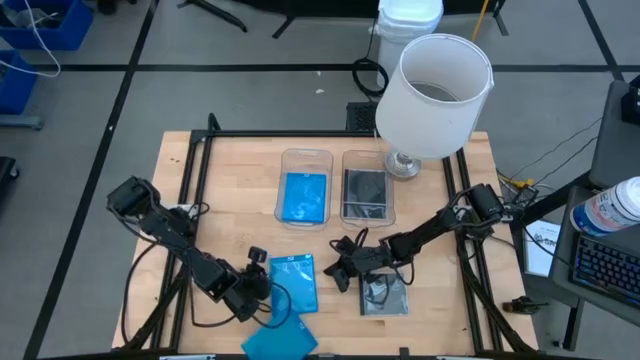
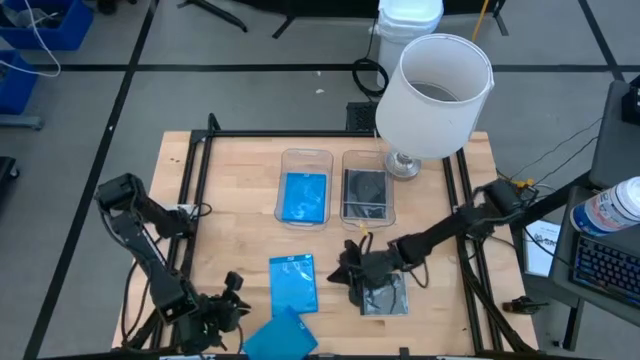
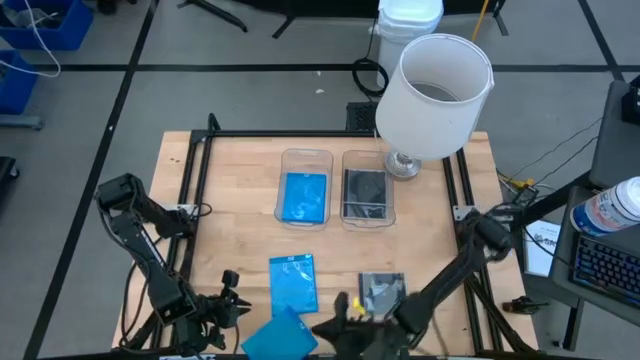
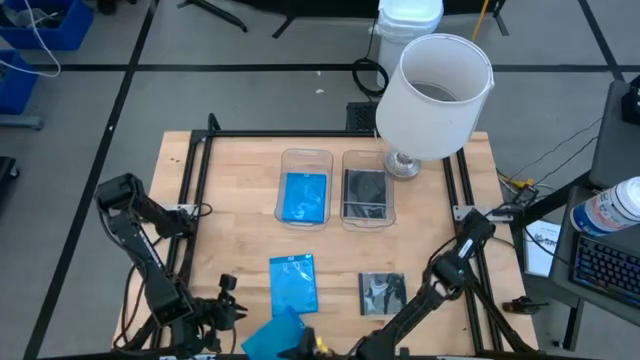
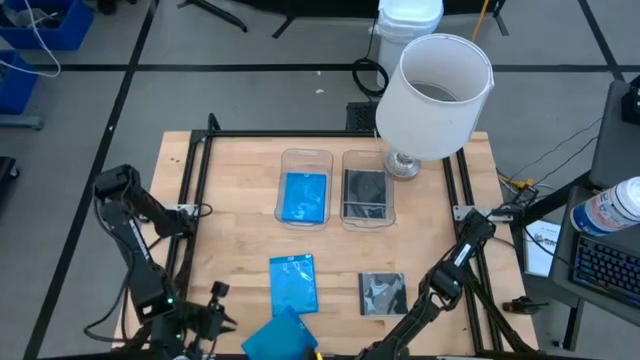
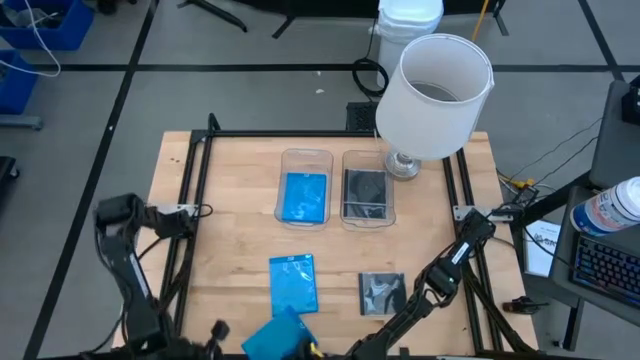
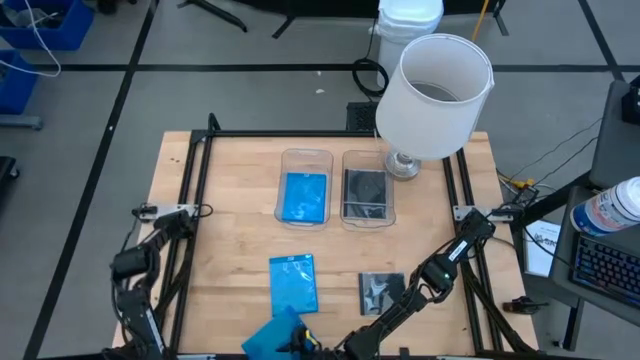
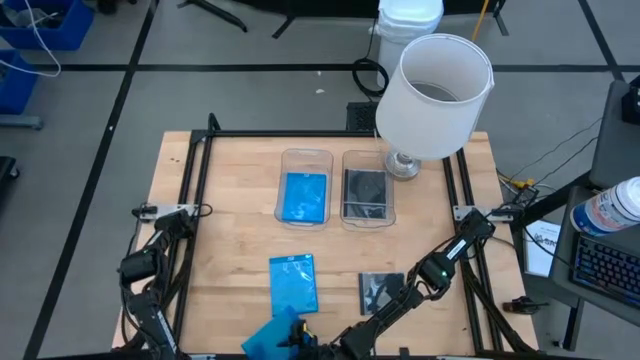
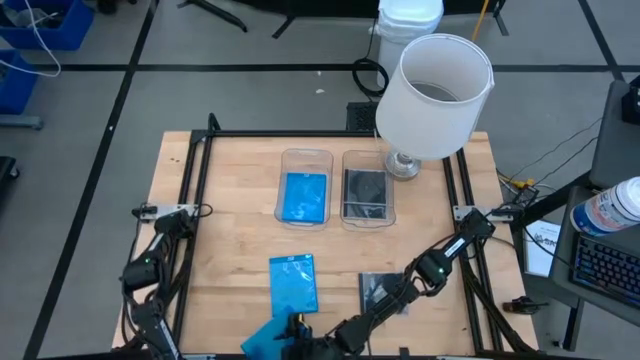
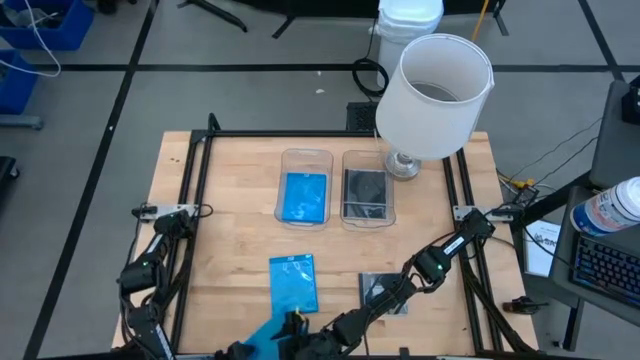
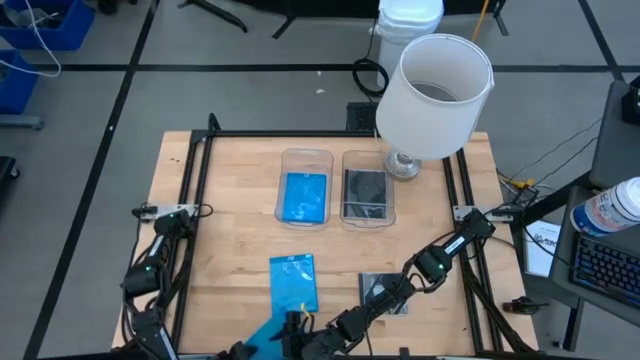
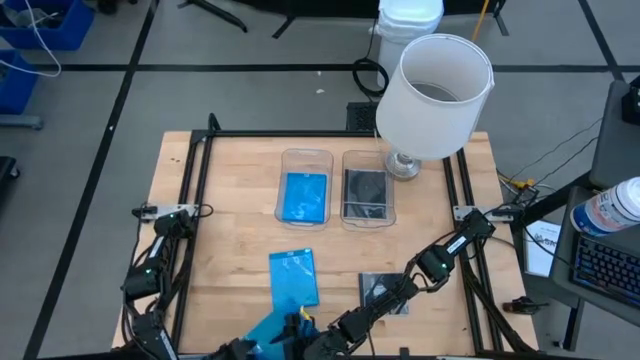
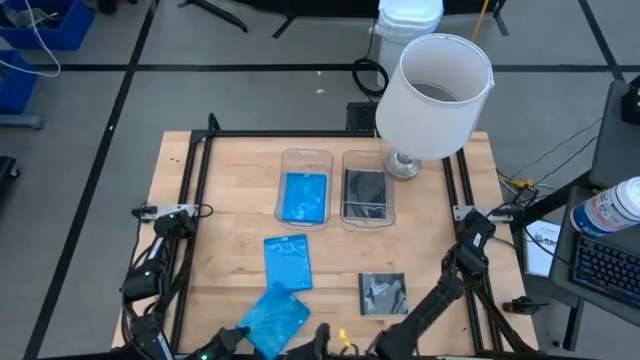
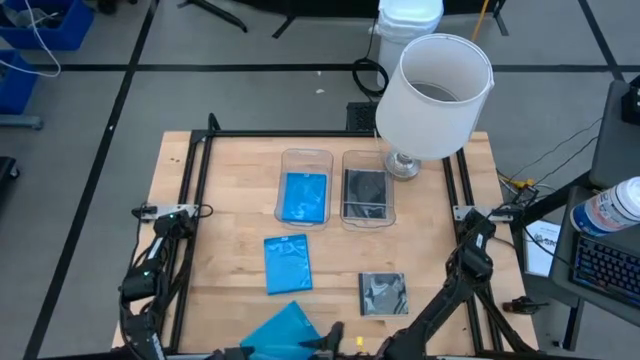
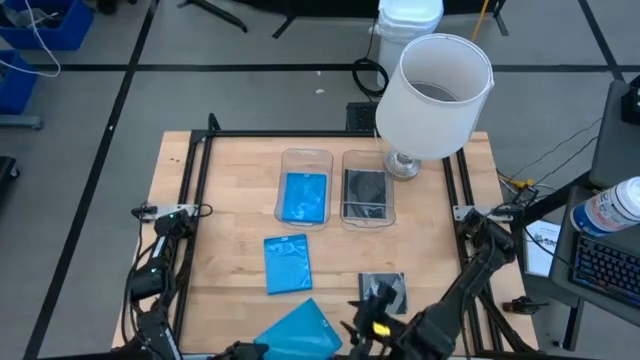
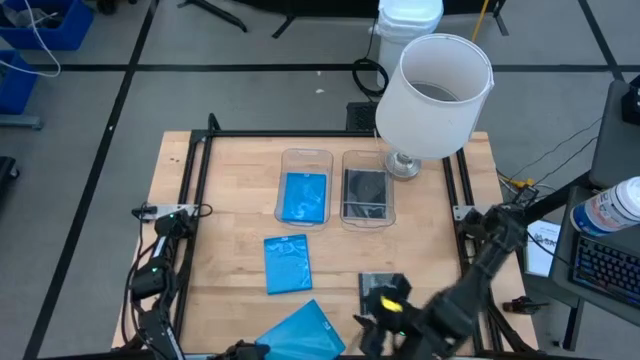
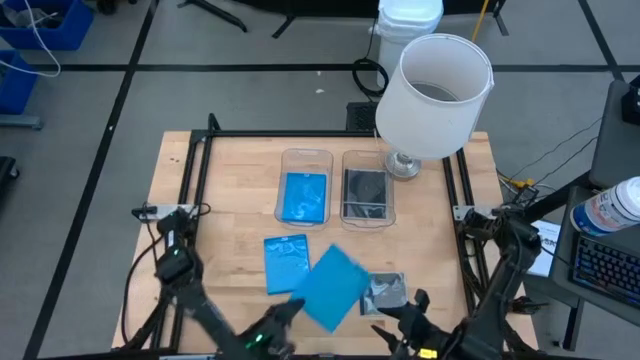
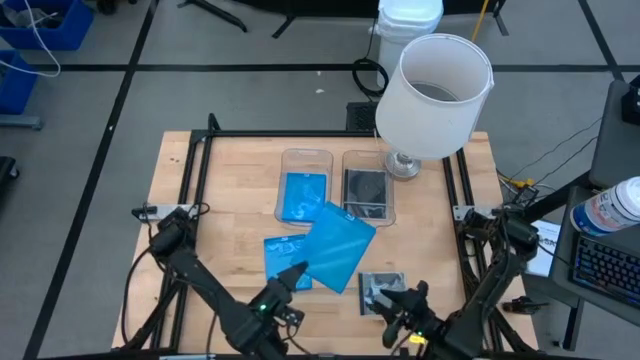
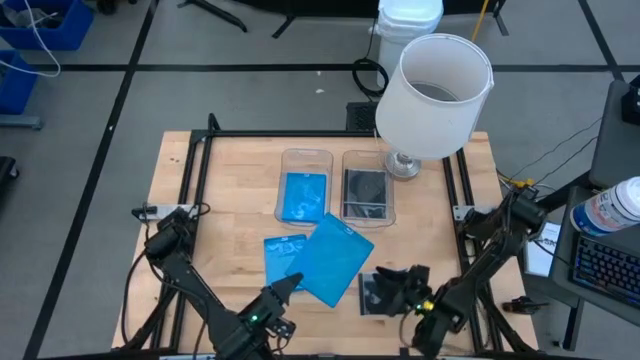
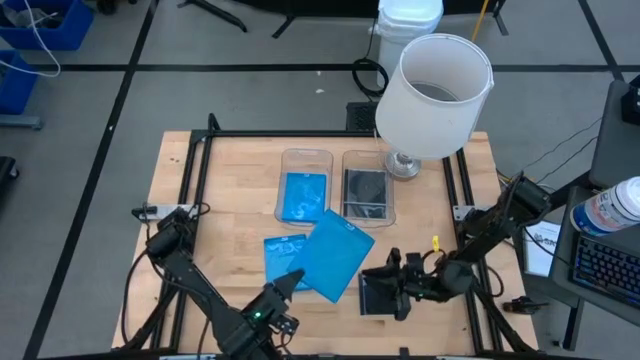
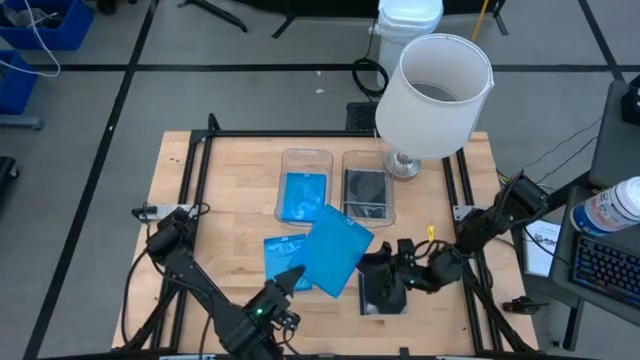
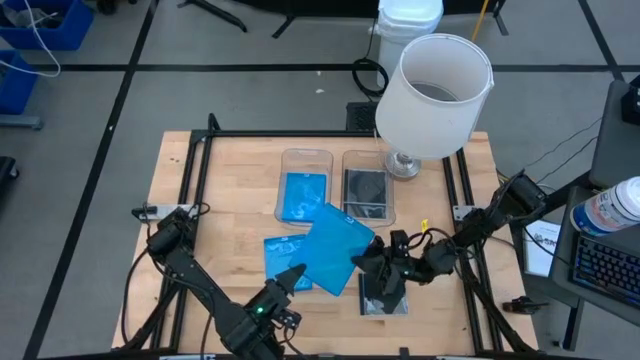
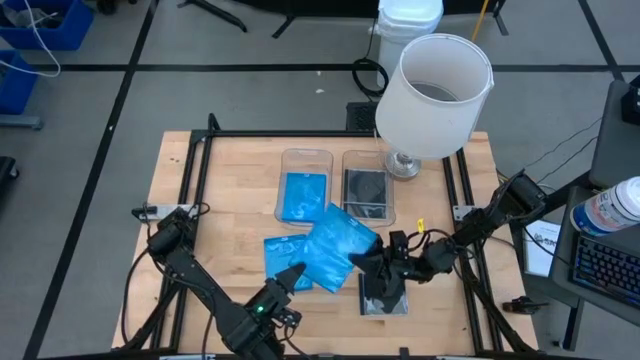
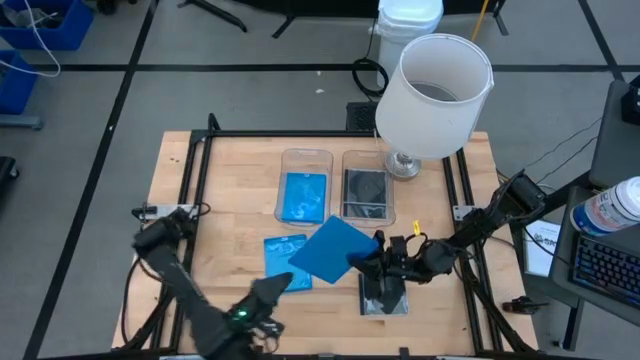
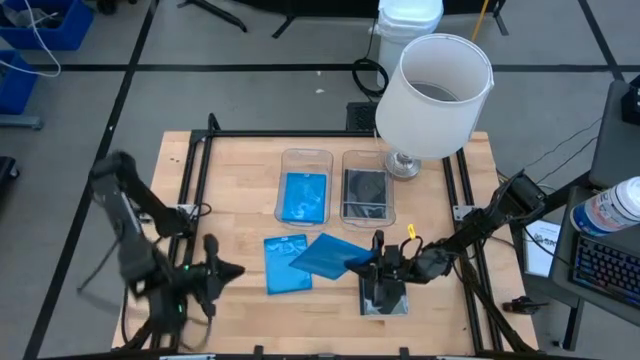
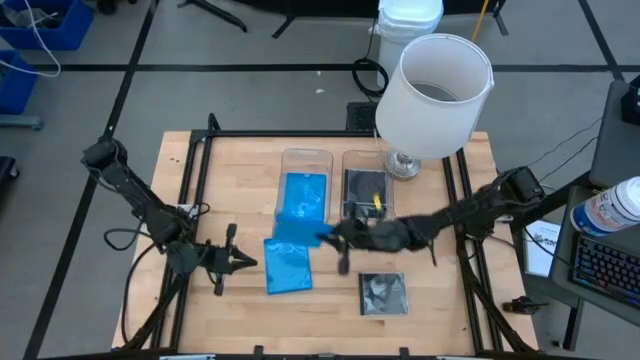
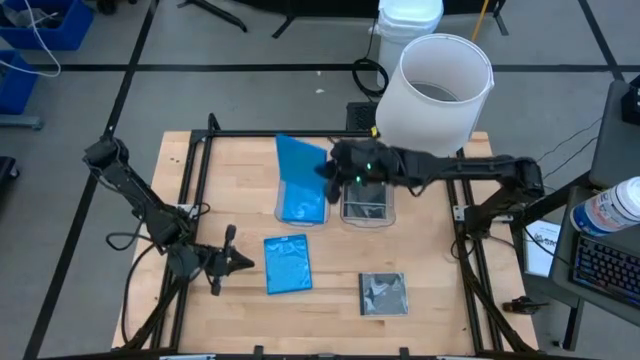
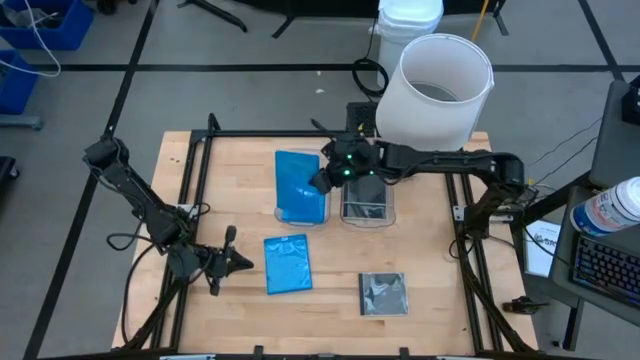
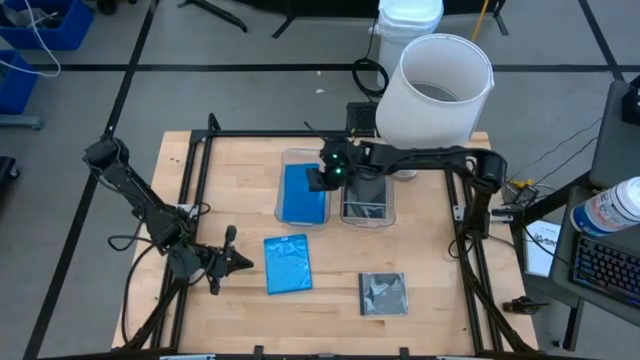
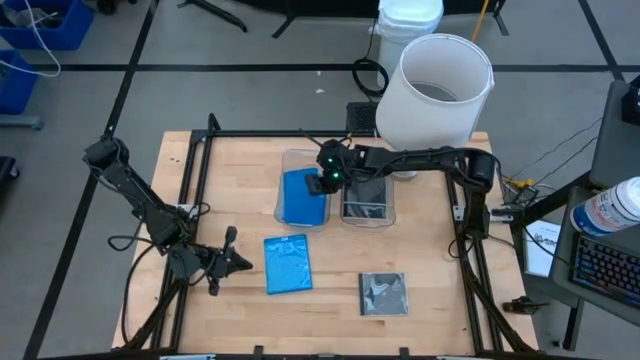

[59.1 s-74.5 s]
Task: Pick & place jewel cases by type
Put the blue cd case into the left transparent bin

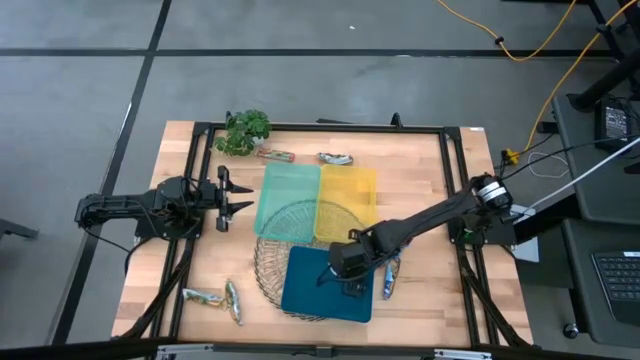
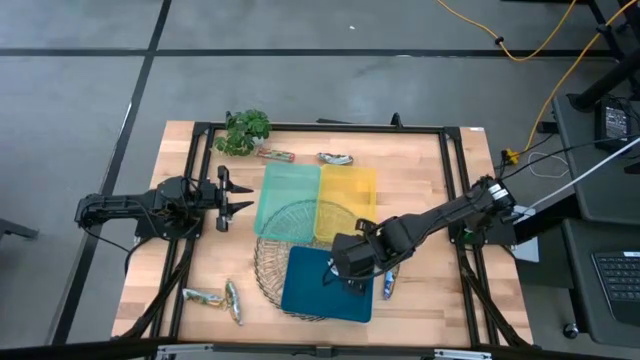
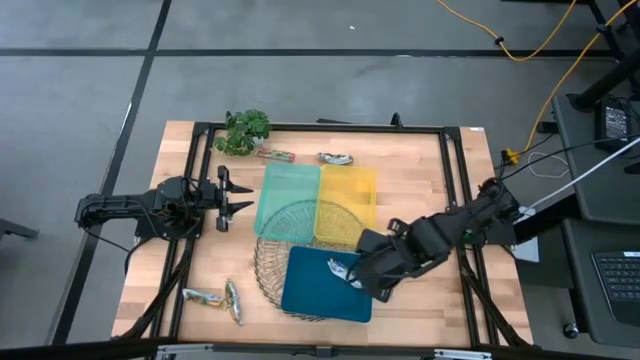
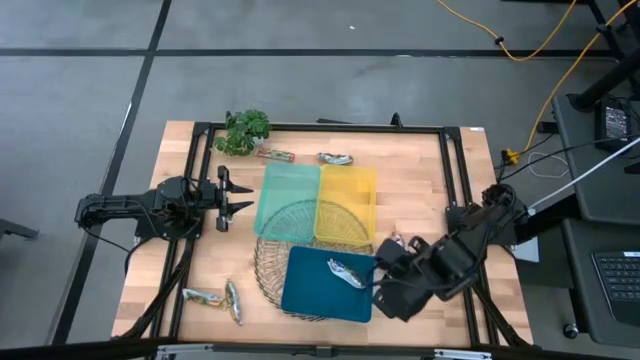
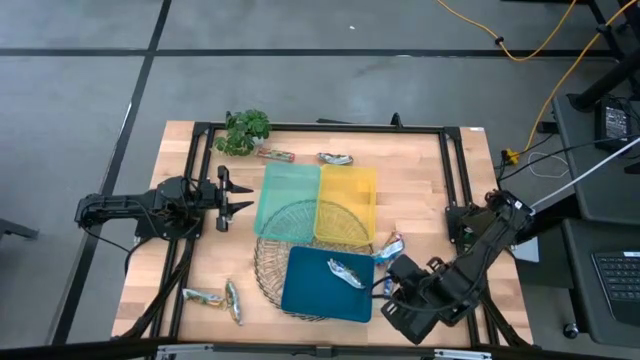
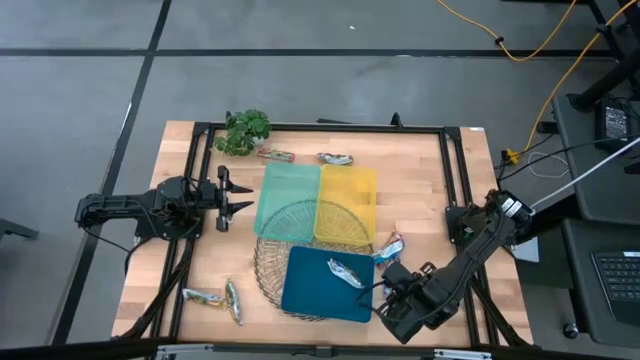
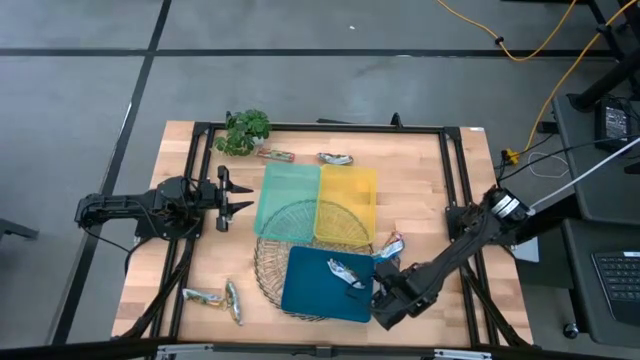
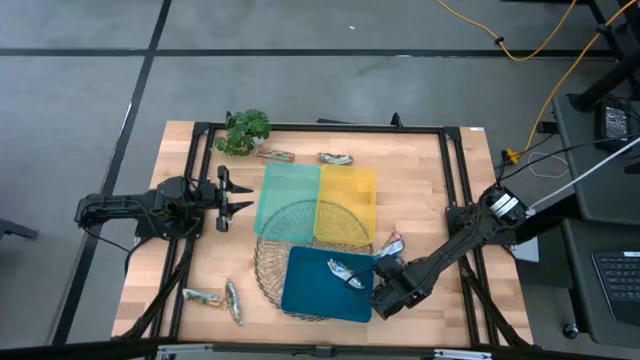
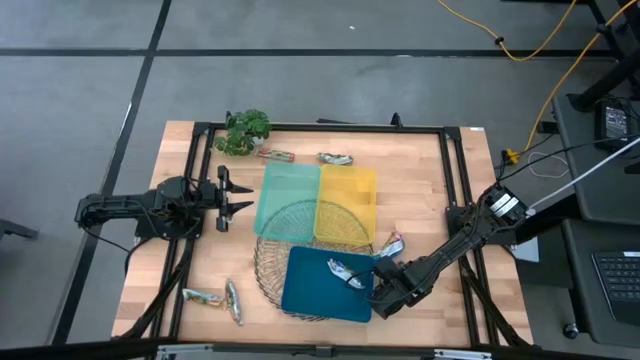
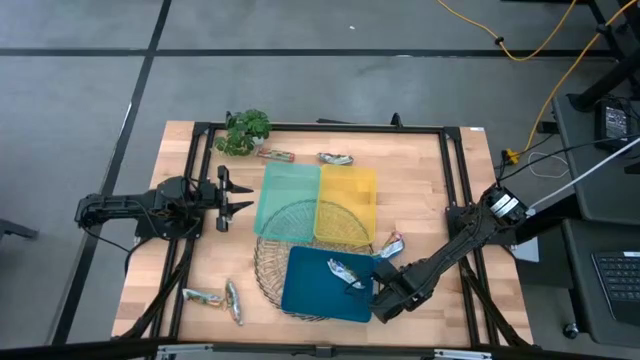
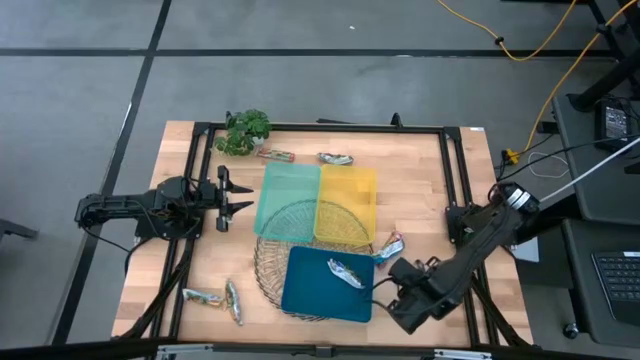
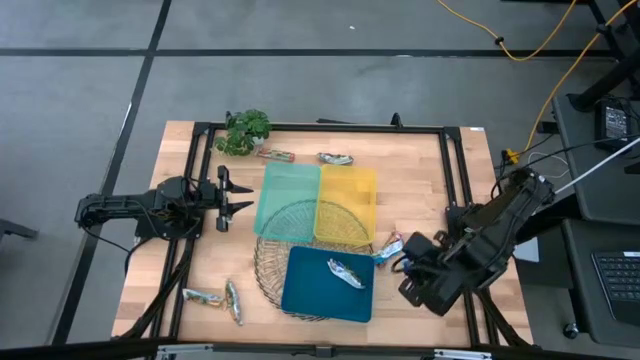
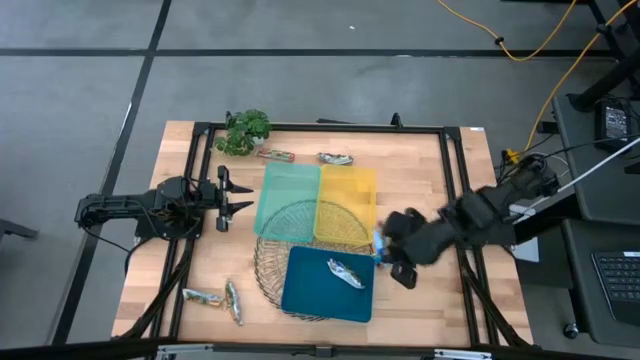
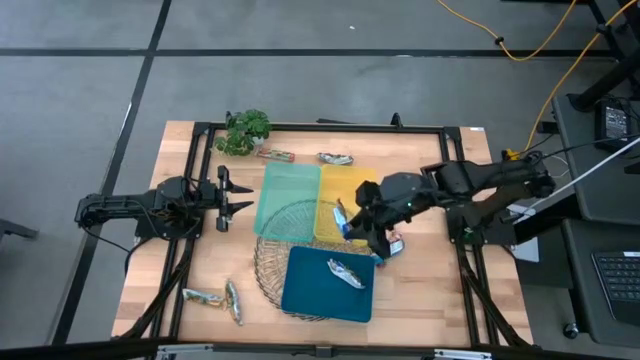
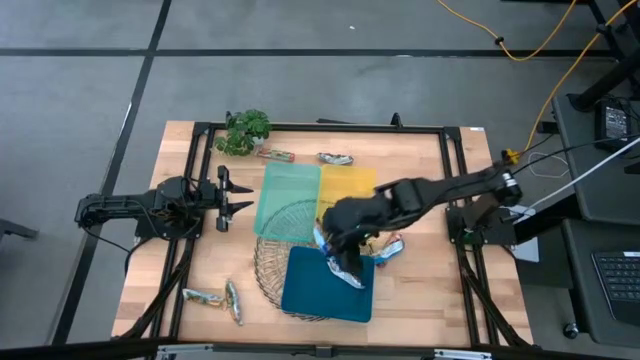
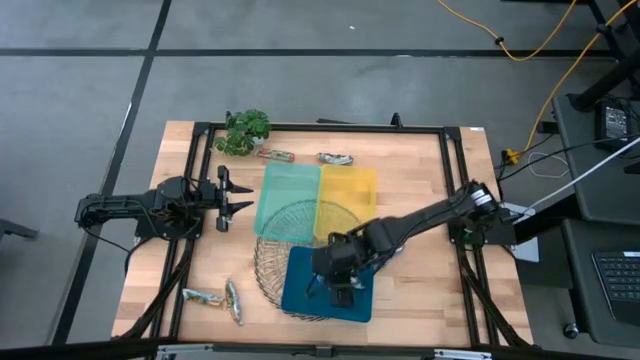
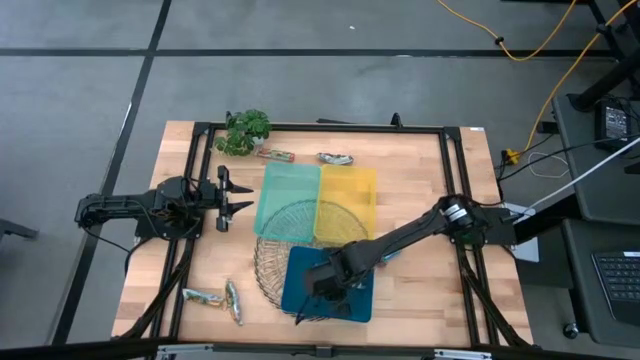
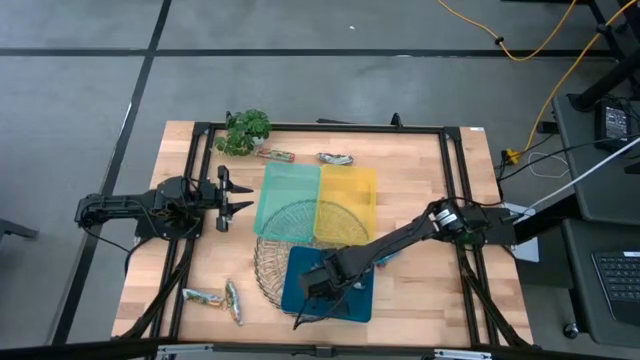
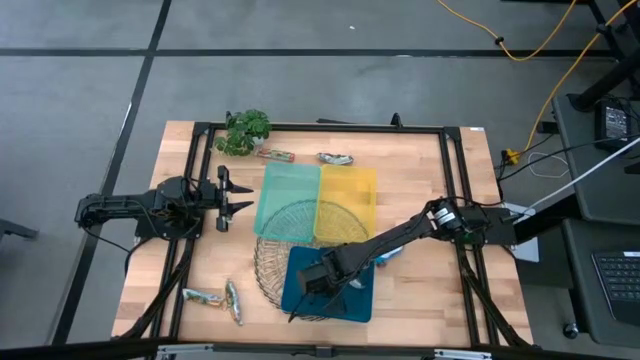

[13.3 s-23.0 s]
Task: Pick and place Granola Bars by type
Put the blue granola bar into the blue bin
